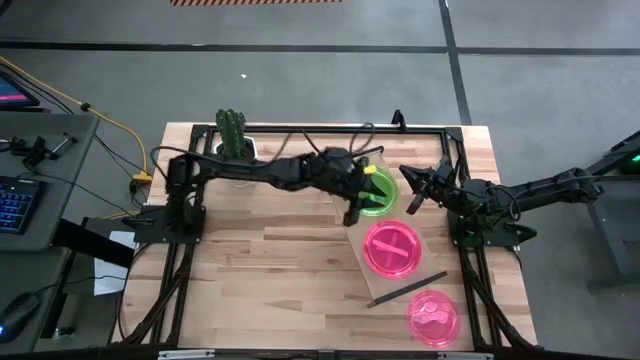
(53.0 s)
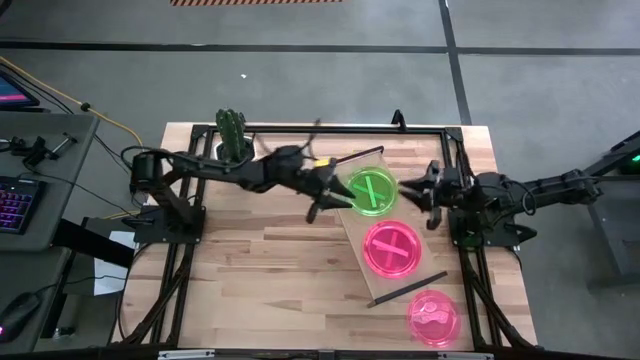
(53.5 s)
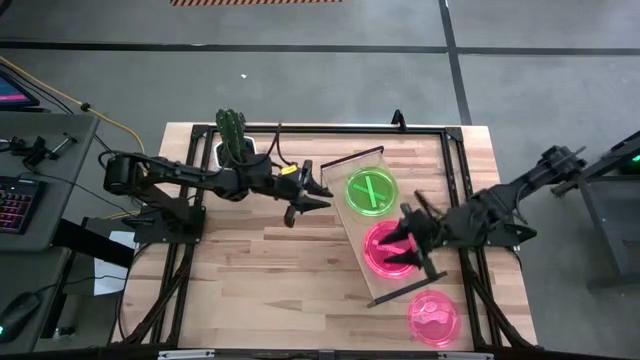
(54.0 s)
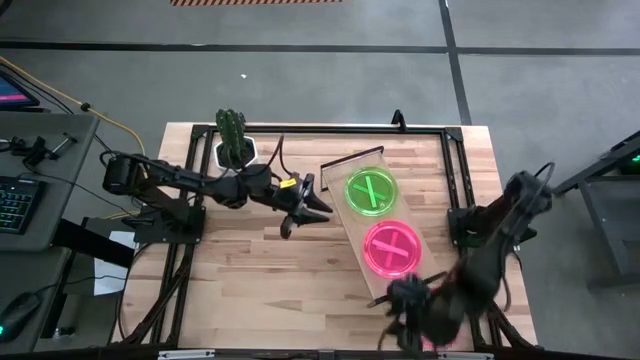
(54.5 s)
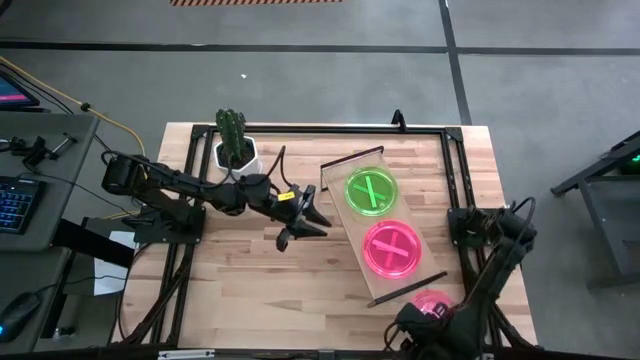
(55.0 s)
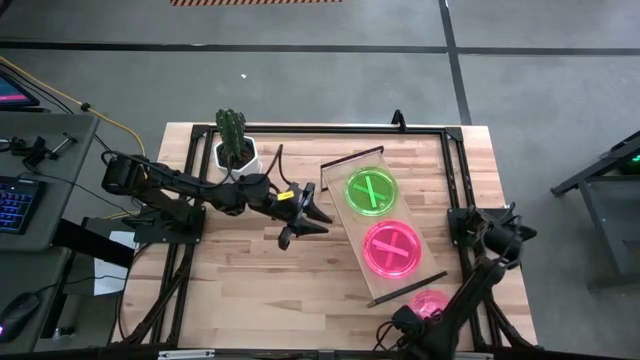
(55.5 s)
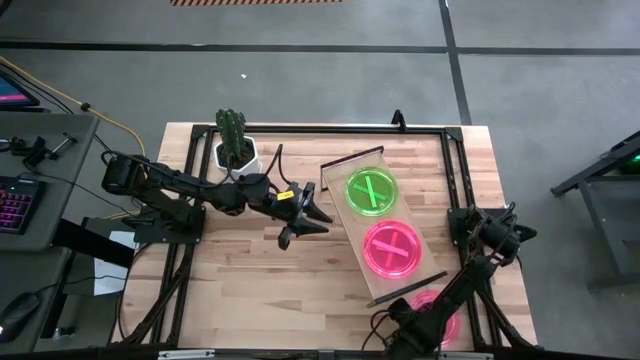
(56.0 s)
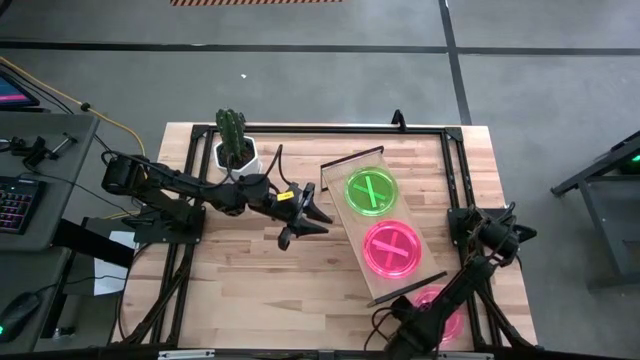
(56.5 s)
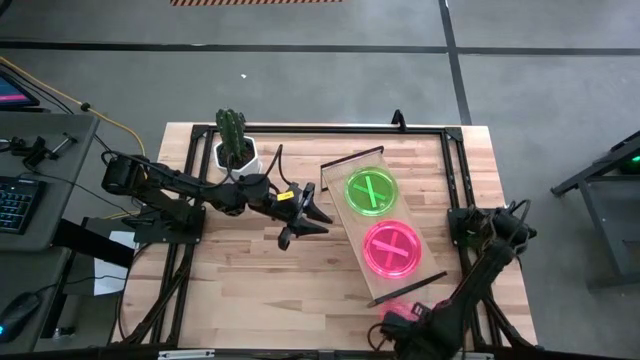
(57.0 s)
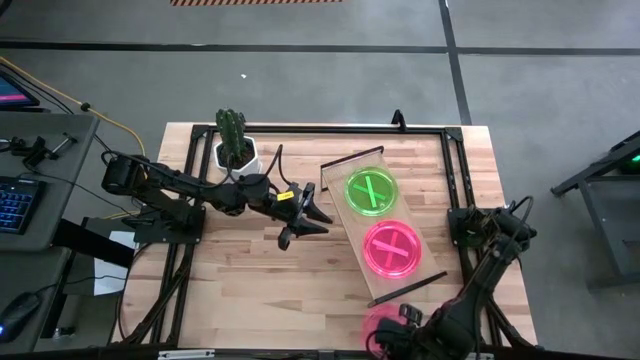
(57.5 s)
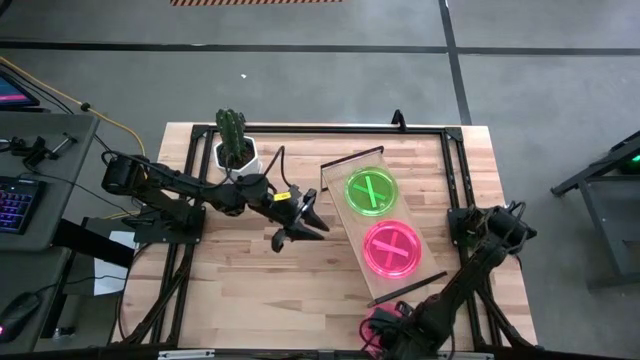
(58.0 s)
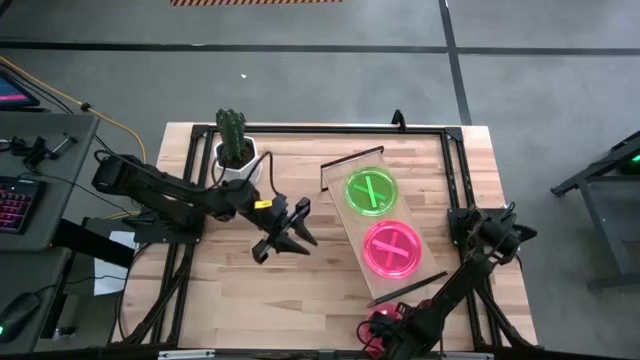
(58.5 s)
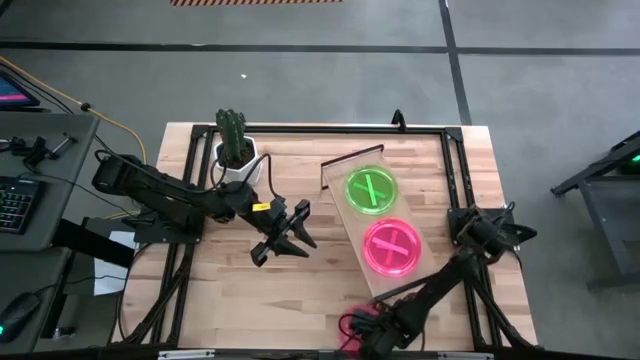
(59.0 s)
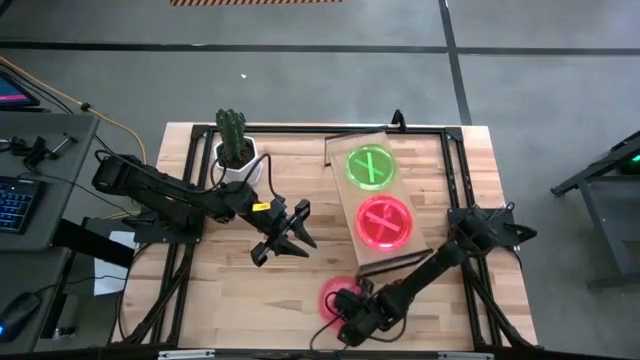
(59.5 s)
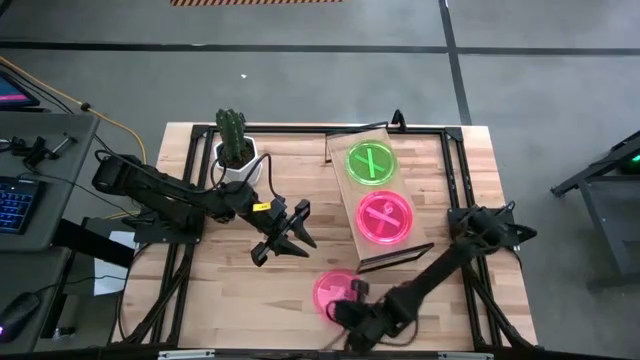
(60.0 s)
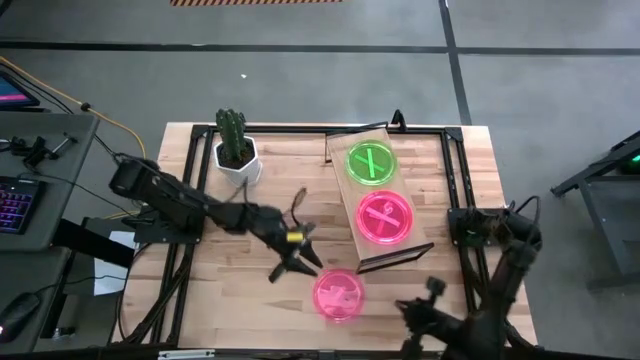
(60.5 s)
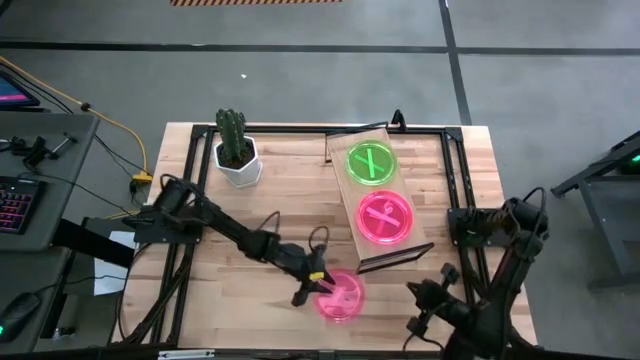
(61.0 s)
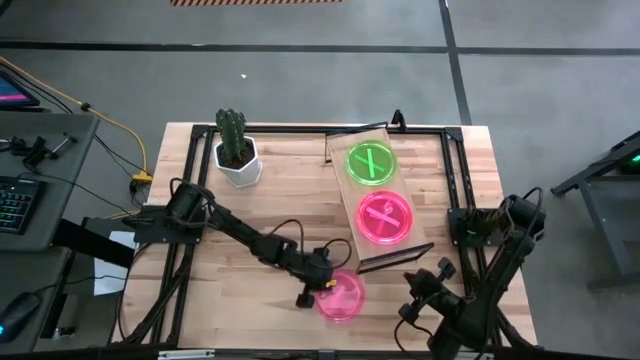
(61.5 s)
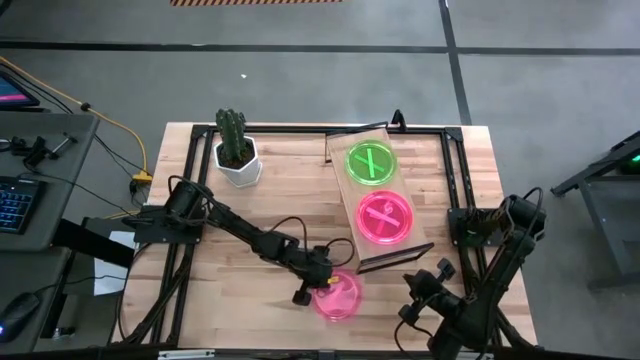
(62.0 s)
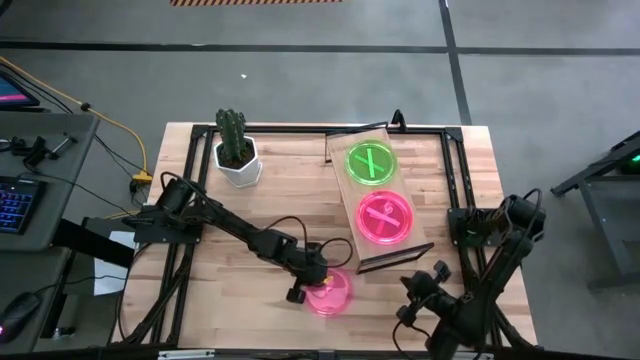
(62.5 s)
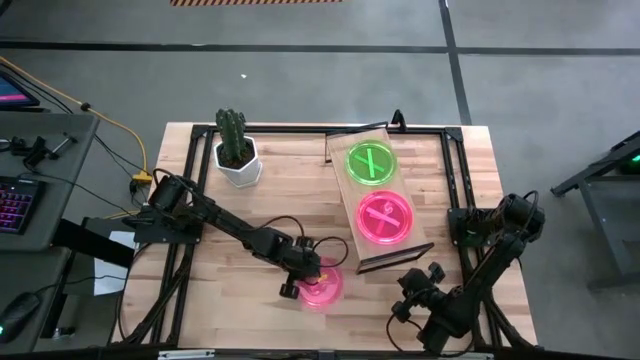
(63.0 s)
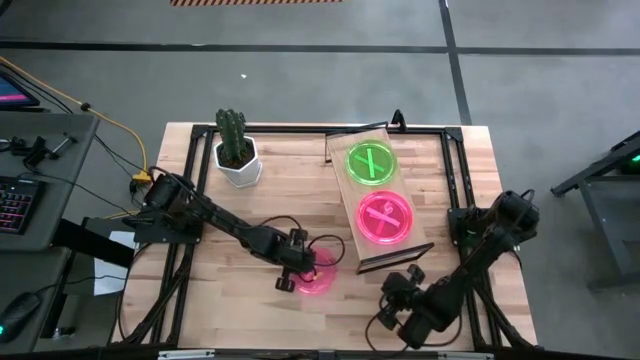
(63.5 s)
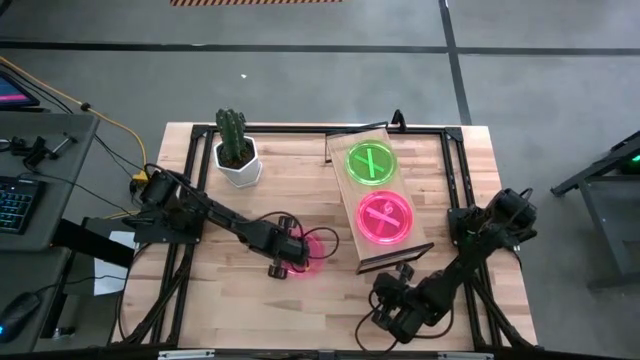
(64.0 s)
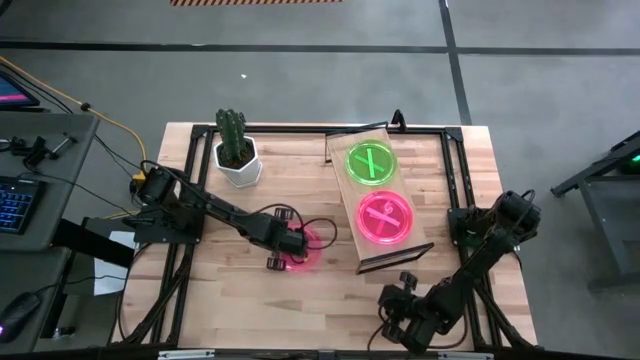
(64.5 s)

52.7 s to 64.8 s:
Task: Place and stack plates onto a shelf
Stack the pink plate on top of the other pink plate on the shelf

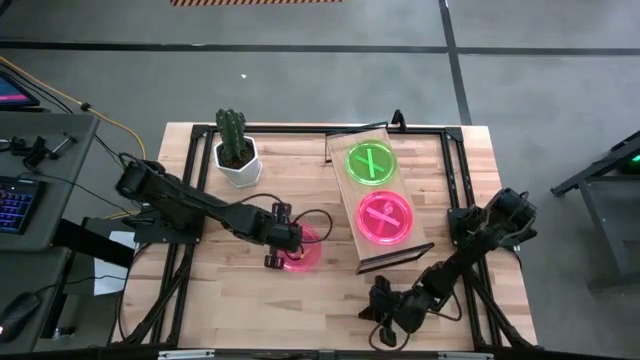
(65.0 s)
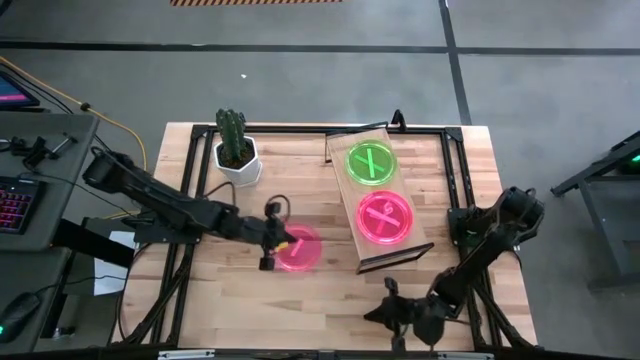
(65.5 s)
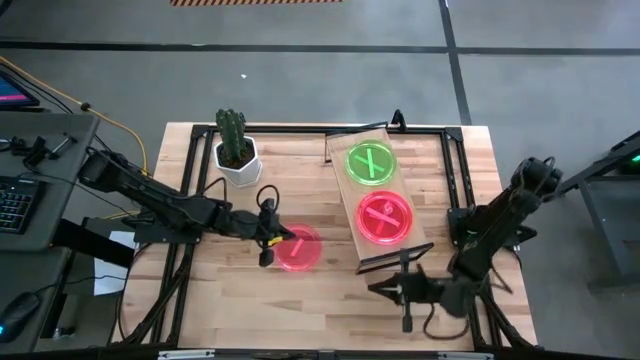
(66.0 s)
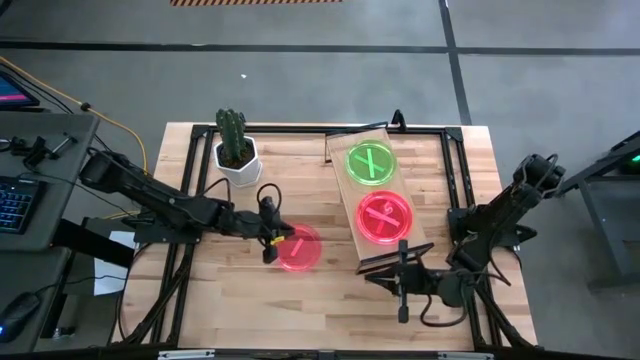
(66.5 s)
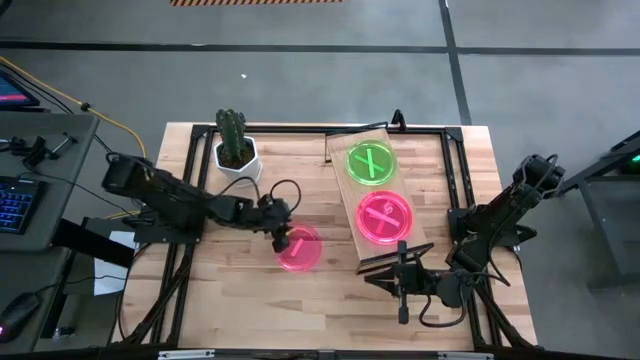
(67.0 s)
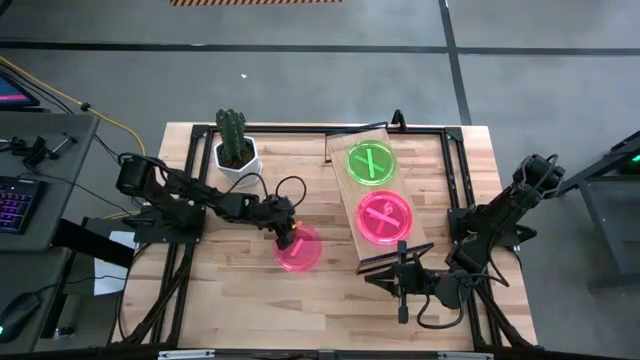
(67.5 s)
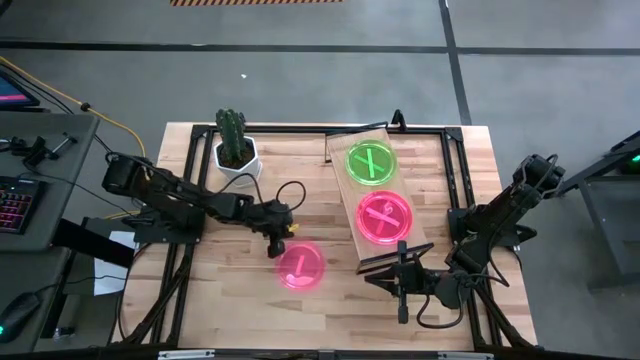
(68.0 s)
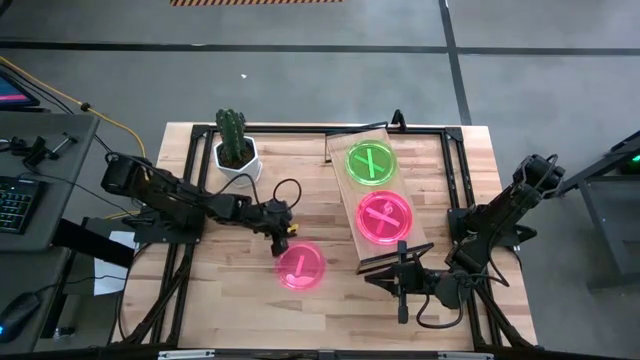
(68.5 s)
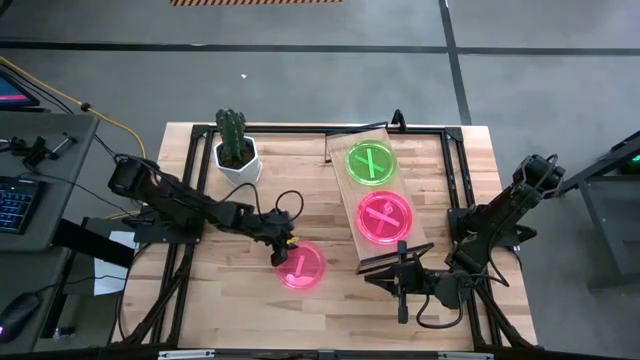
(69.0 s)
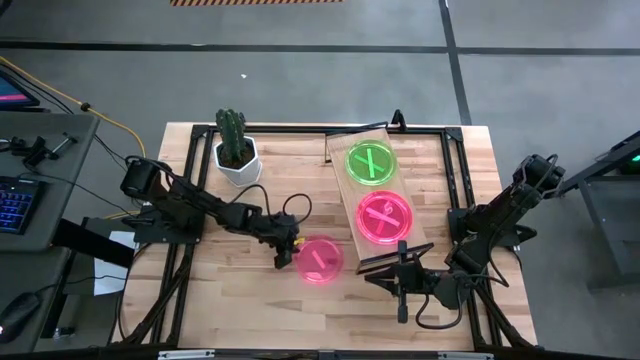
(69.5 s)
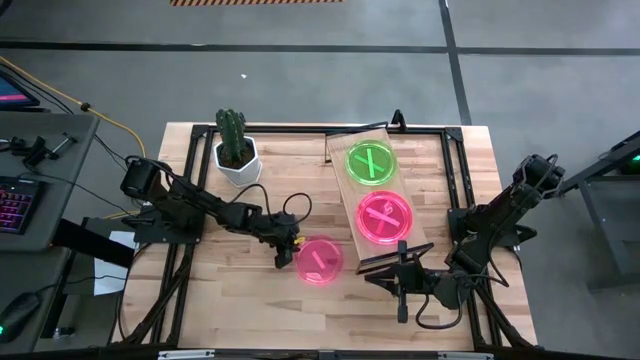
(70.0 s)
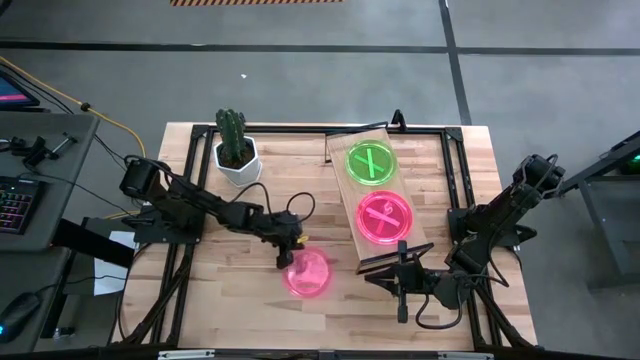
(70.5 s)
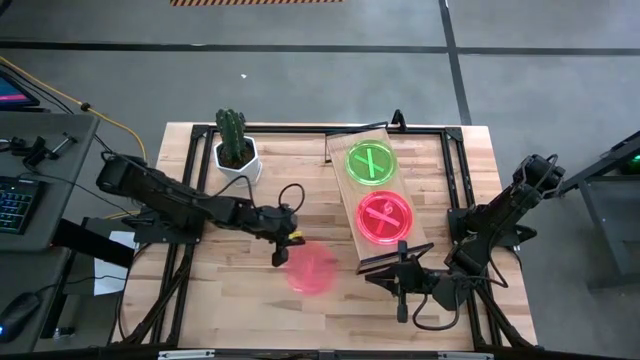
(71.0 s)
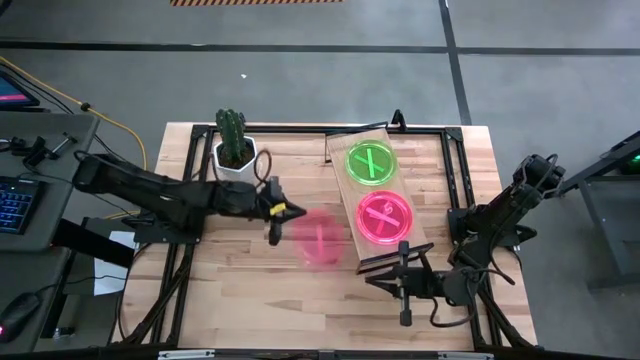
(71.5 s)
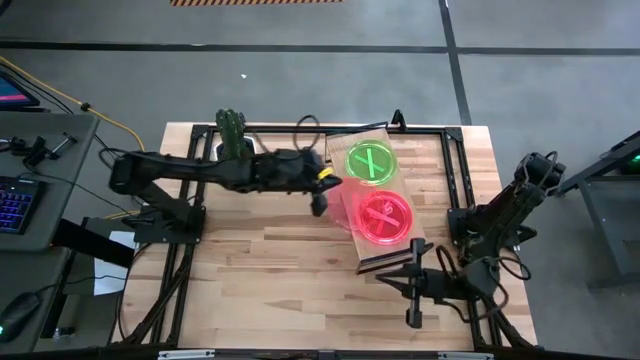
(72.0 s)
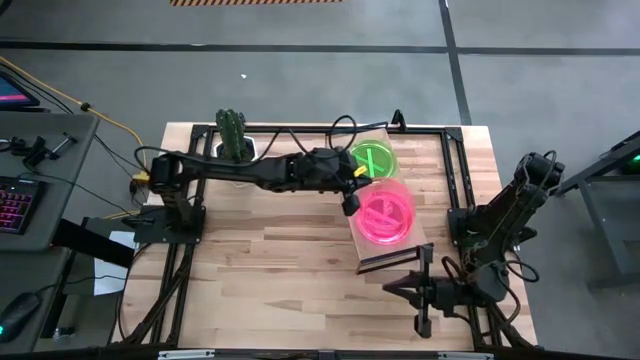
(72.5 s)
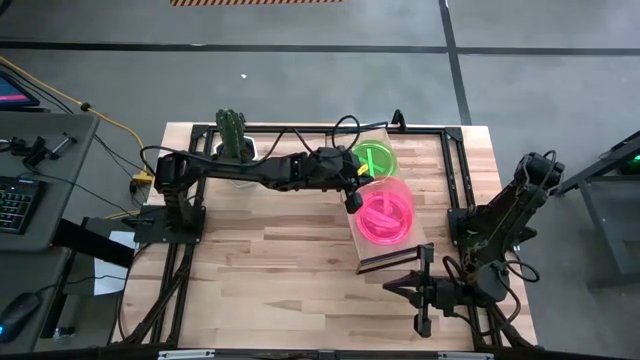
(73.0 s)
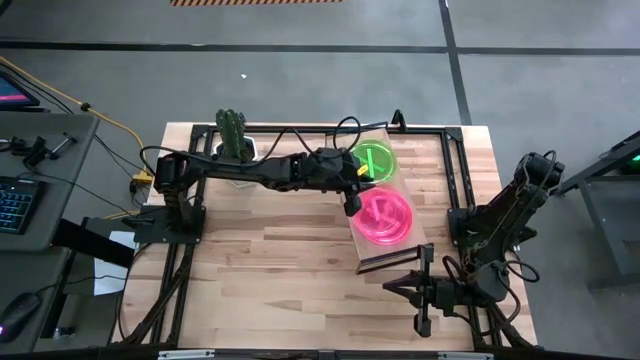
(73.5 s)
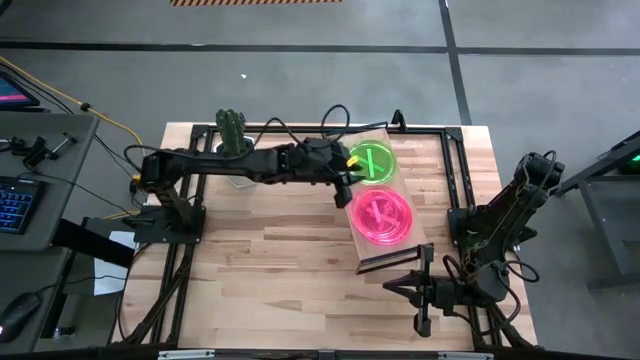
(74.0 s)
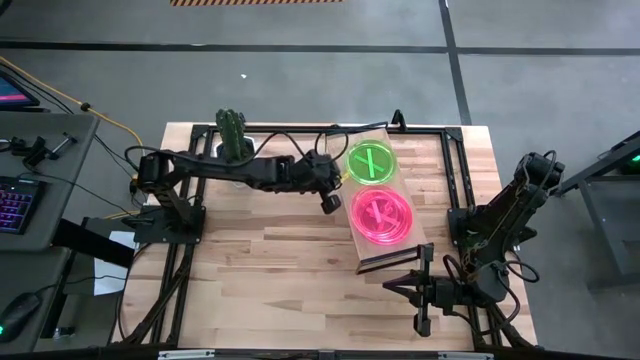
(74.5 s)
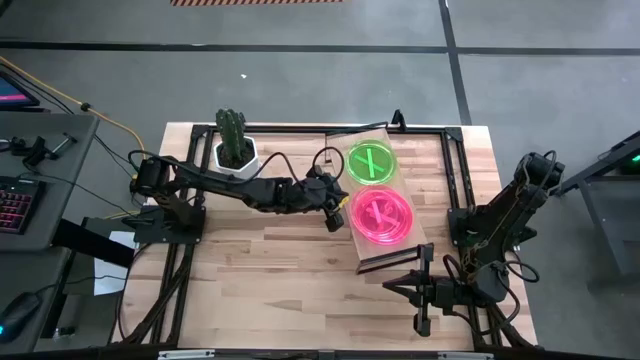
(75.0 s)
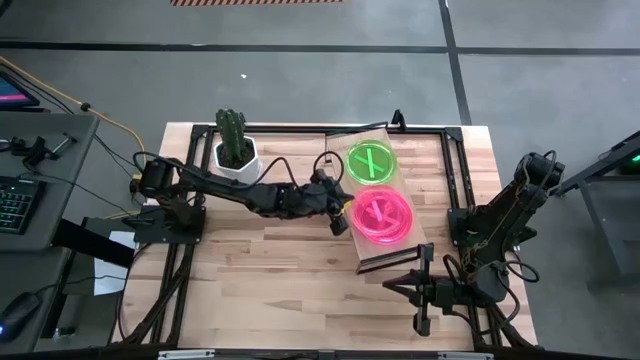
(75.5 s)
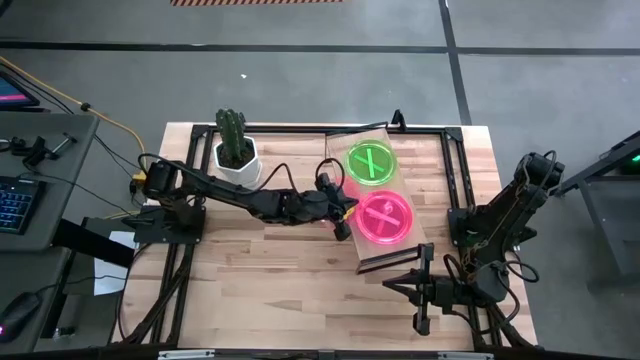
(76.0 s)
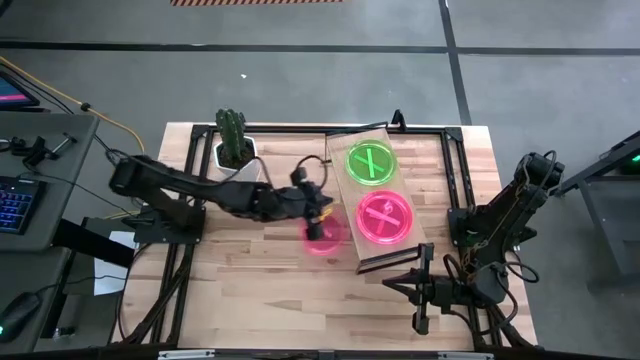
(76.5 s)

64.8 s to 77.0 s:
Stack the pink plate on top of the other pink plate on the shelf
